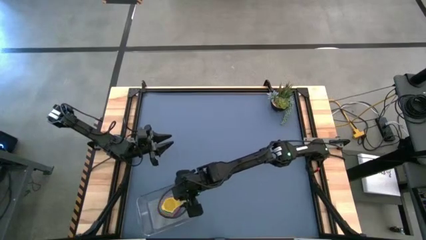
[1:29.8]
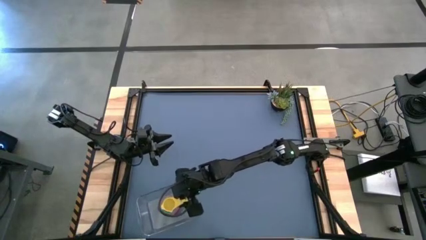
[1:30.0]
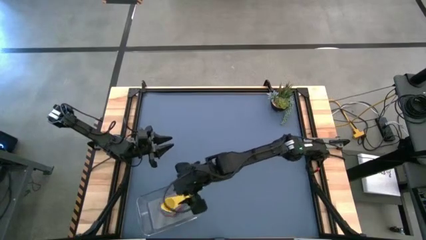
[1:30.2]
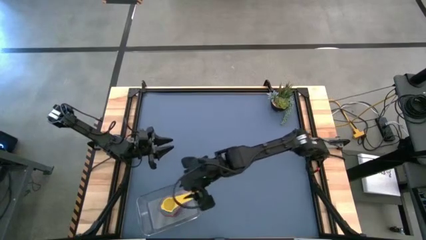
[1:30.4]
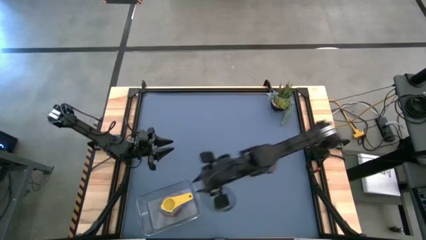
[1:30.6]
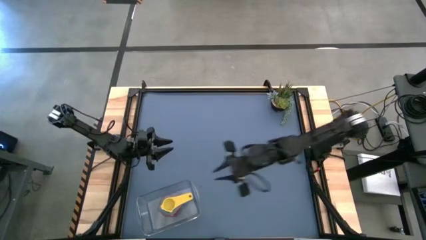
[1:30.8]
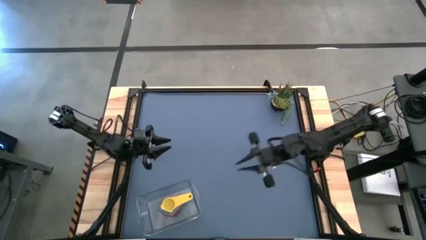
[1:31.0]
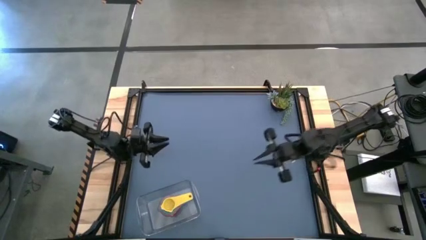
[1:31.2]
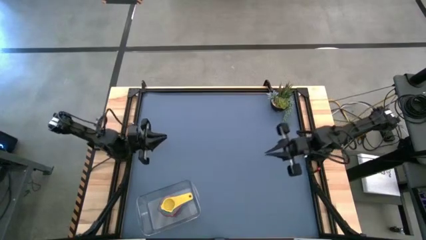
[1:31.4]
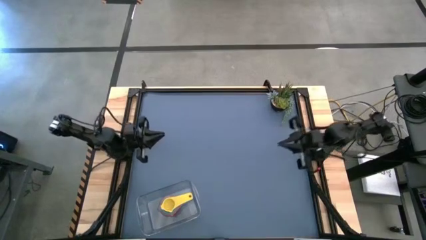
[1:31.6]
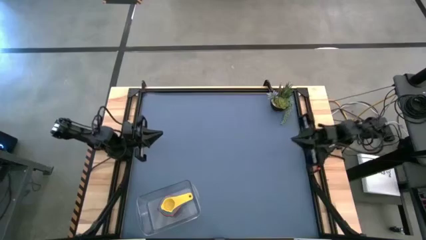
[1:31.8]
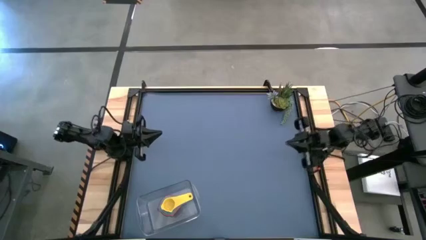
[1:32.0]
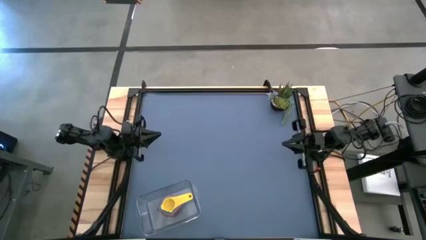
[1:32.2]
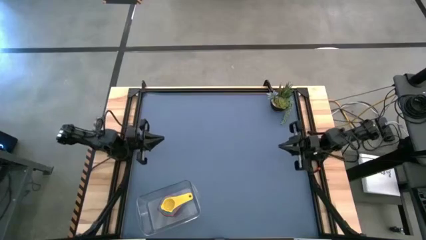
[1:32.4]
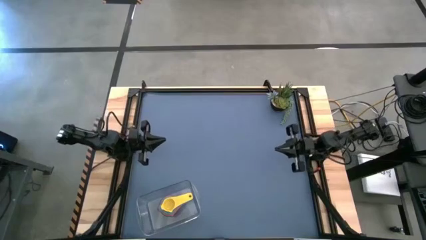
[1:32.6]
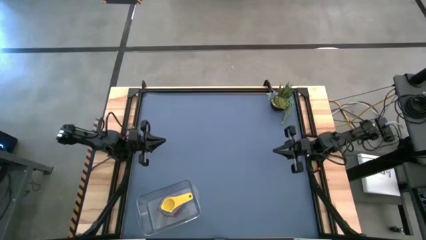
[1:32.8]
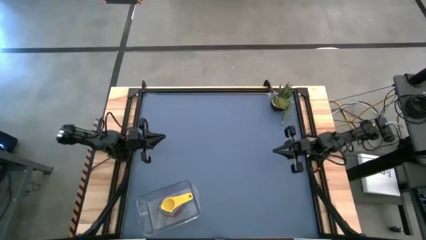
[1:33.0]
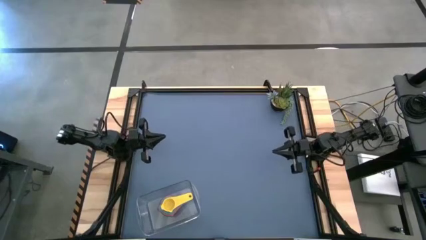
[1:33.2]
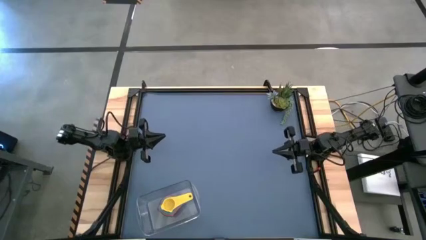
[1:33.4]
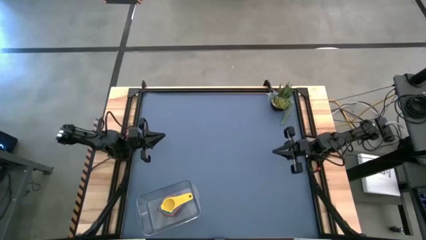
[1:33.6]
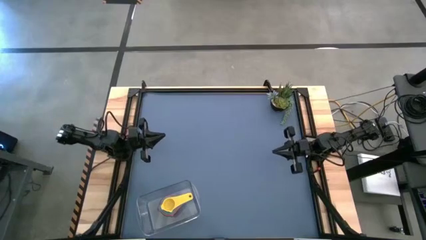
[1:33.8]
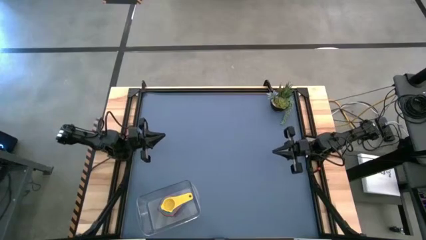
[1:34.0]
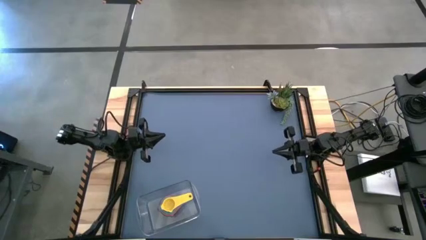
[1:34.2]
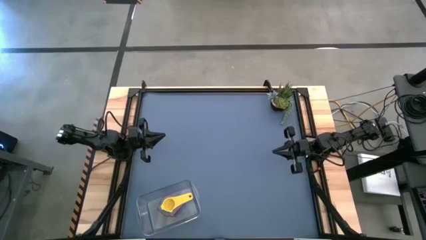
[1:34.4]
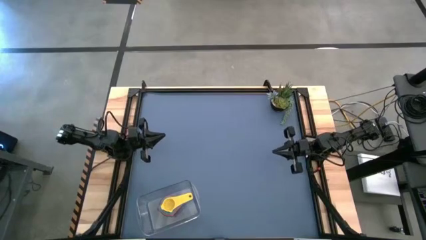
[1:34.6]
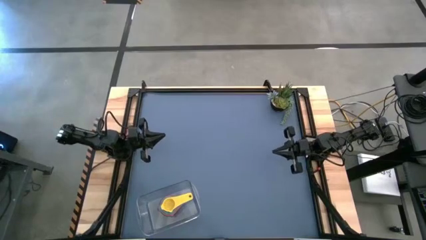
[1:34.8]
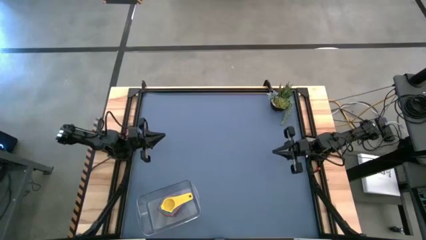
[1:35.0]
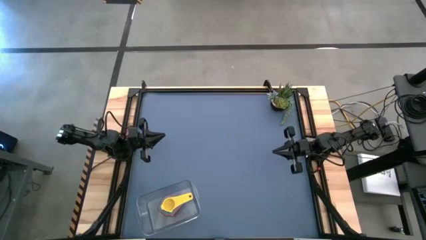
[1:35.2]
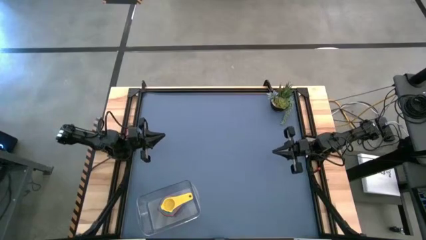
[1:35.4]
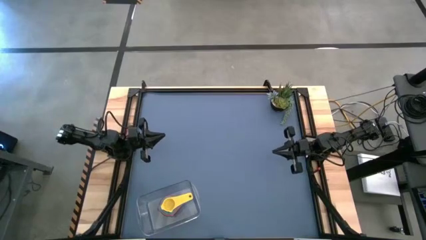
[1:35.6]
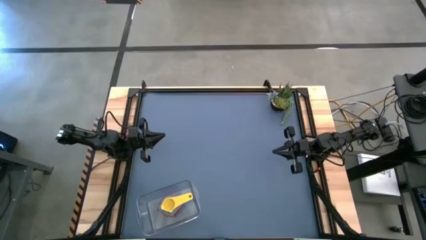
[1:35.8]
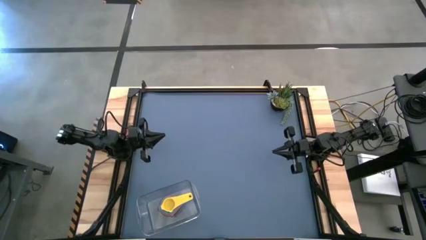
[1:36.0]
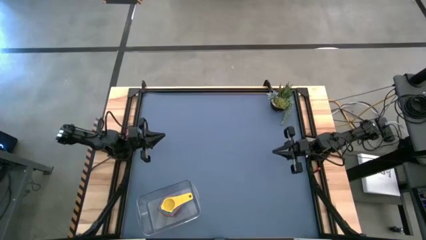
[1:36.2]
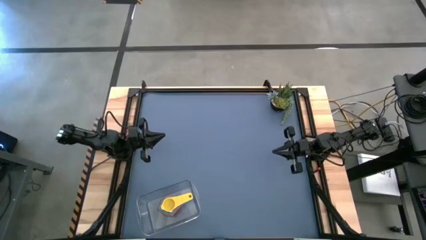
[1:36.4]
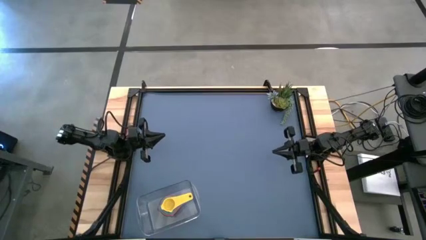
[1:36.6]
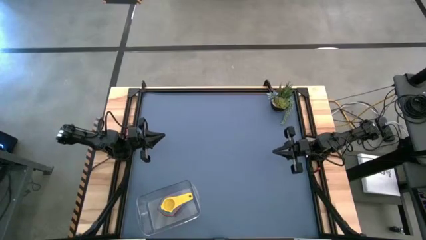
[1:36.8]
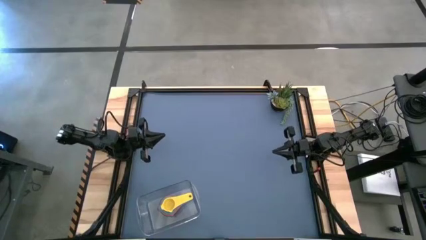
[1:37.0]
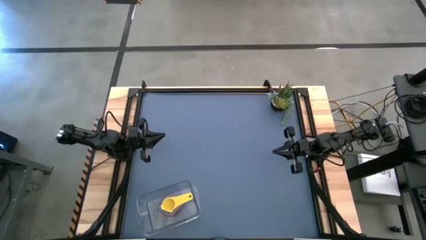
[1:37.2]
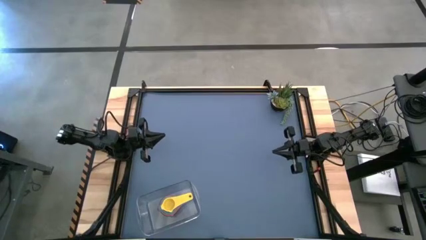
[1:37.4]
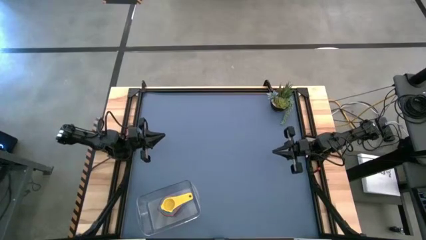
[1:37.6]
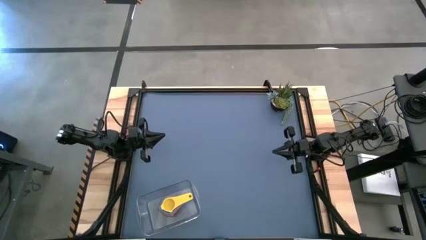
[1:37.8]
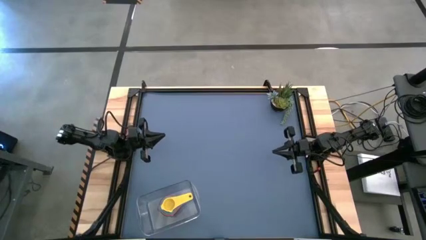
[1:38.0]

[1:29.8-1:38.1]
Task: Nest measuring cups in basket
Return to Home Position

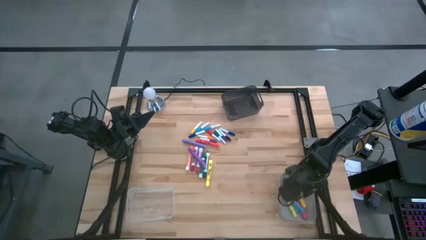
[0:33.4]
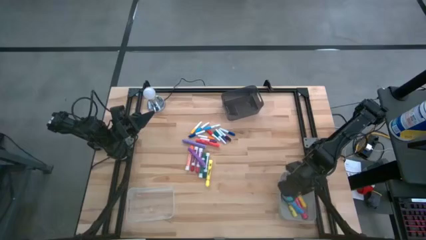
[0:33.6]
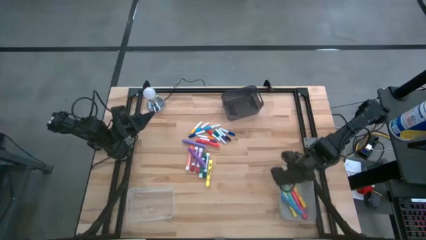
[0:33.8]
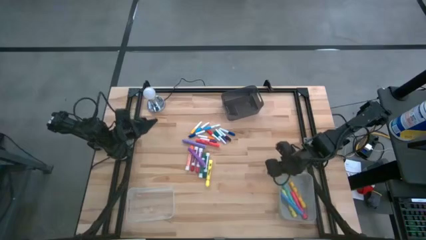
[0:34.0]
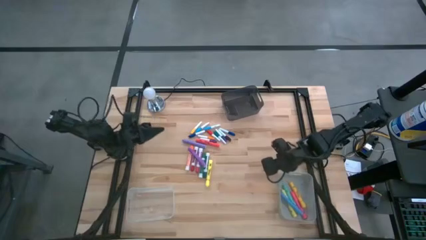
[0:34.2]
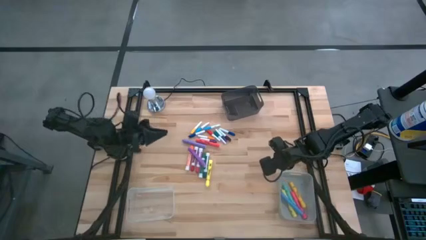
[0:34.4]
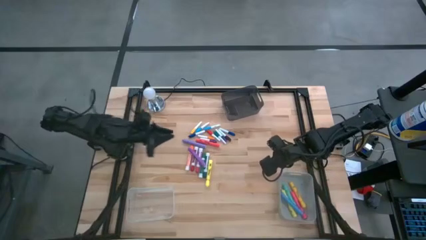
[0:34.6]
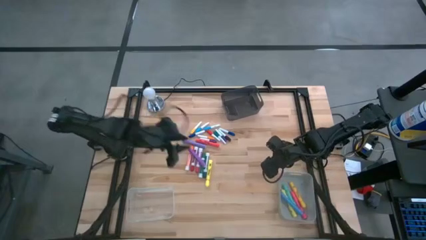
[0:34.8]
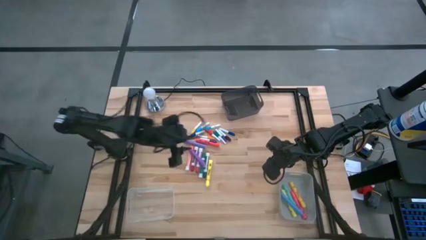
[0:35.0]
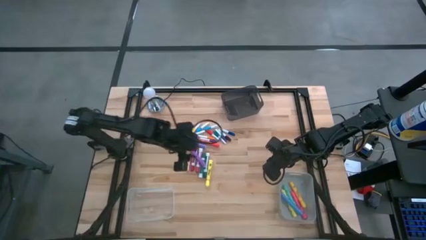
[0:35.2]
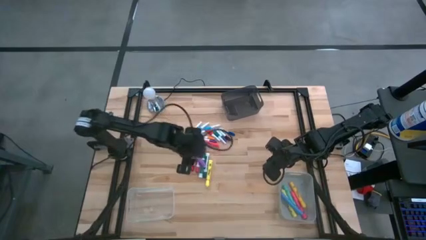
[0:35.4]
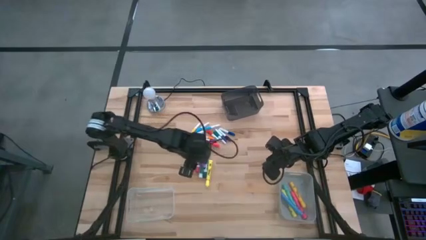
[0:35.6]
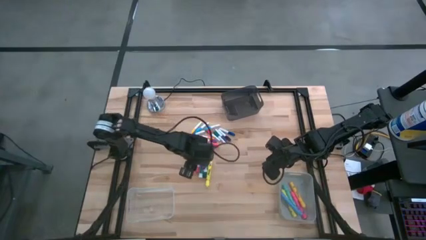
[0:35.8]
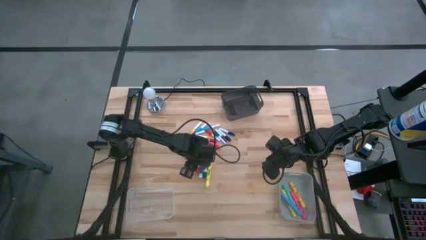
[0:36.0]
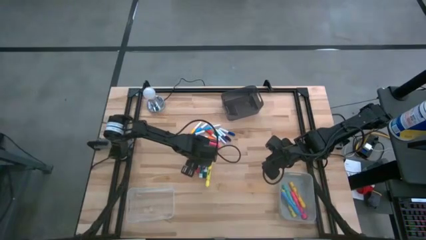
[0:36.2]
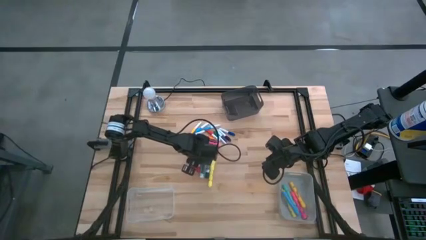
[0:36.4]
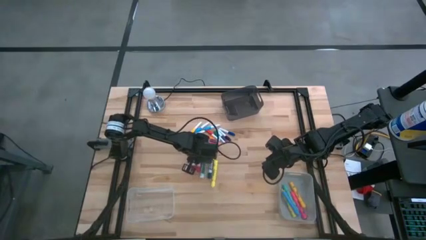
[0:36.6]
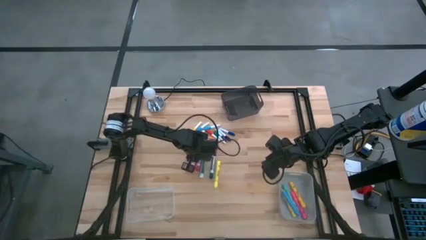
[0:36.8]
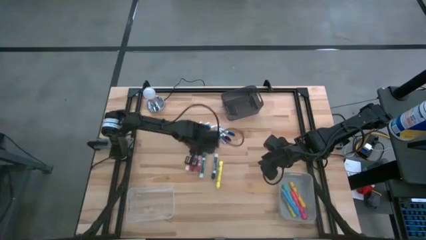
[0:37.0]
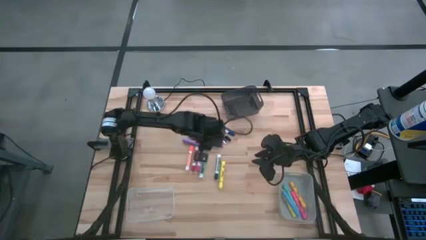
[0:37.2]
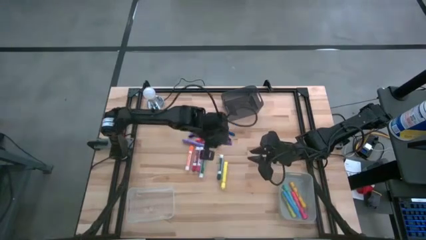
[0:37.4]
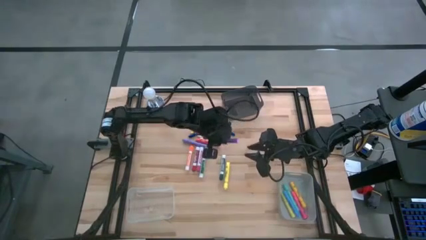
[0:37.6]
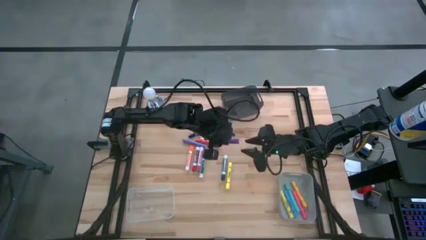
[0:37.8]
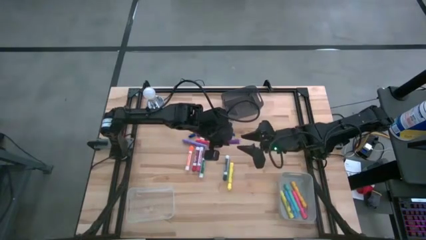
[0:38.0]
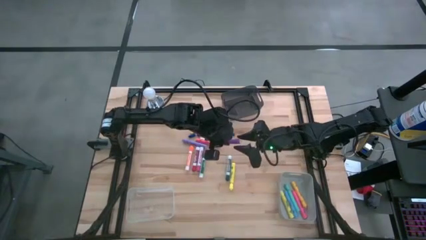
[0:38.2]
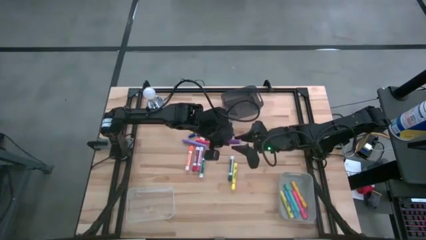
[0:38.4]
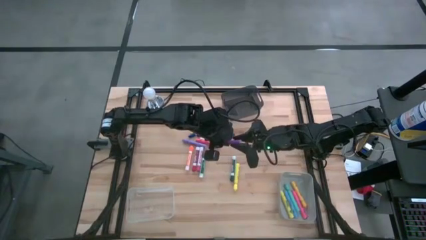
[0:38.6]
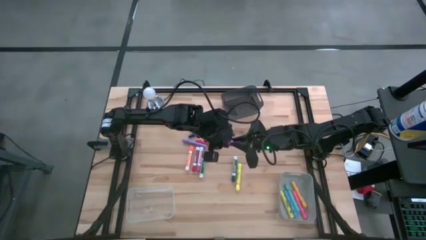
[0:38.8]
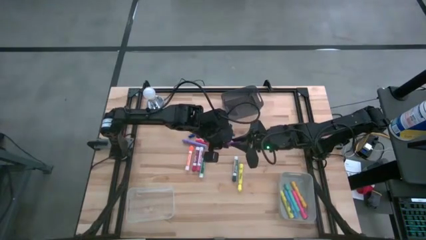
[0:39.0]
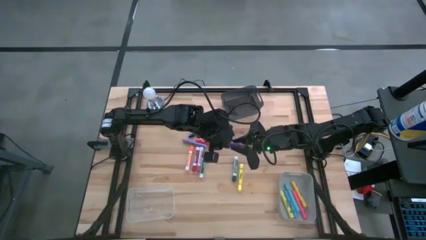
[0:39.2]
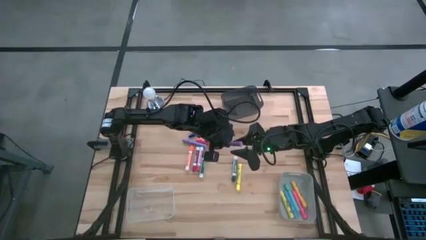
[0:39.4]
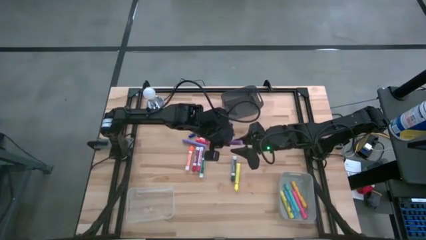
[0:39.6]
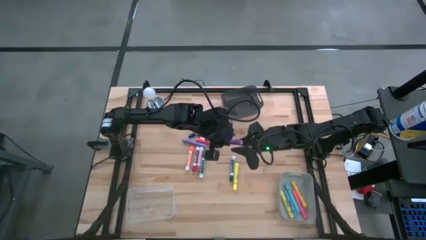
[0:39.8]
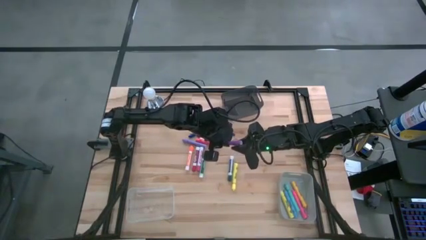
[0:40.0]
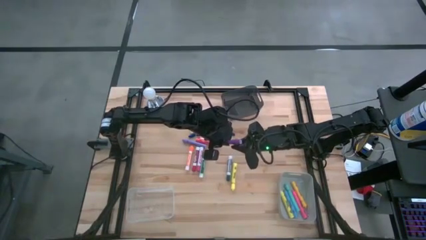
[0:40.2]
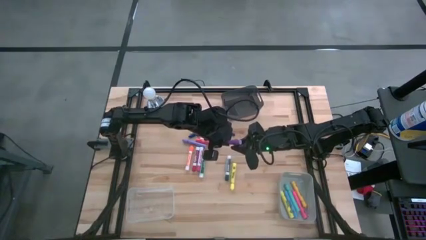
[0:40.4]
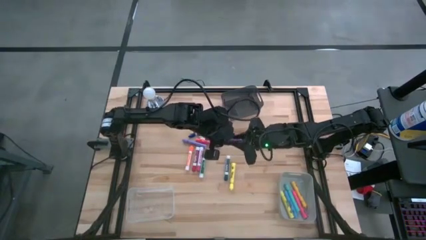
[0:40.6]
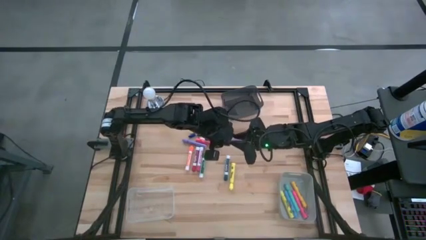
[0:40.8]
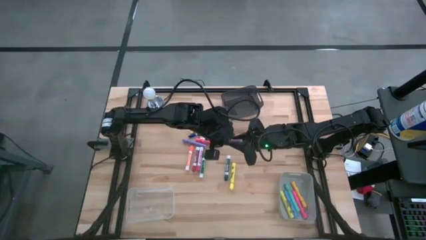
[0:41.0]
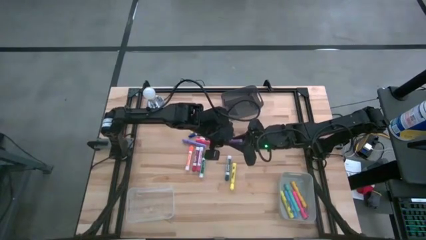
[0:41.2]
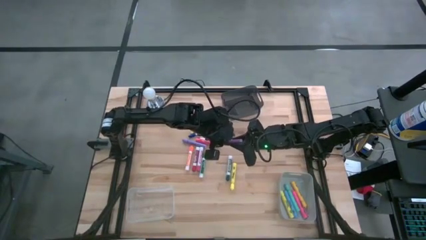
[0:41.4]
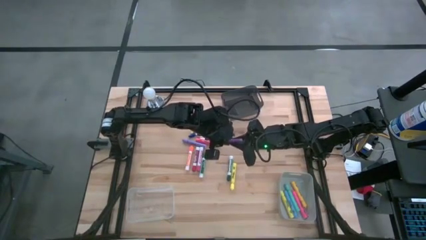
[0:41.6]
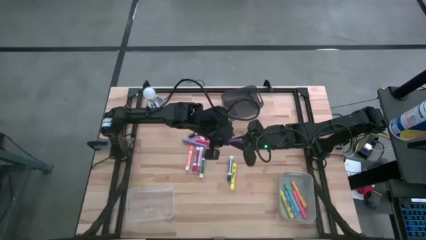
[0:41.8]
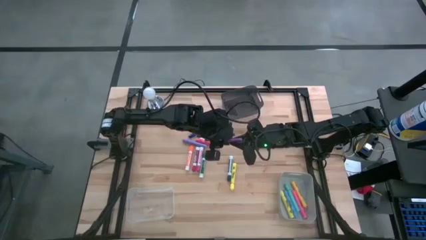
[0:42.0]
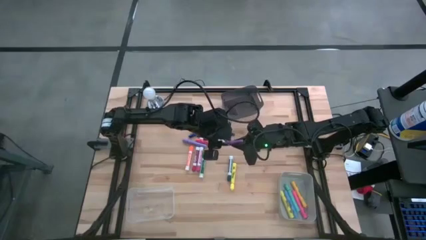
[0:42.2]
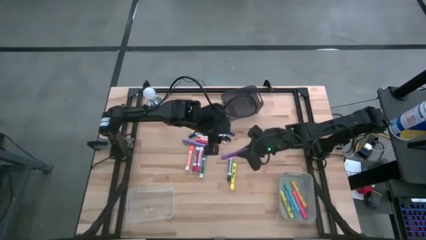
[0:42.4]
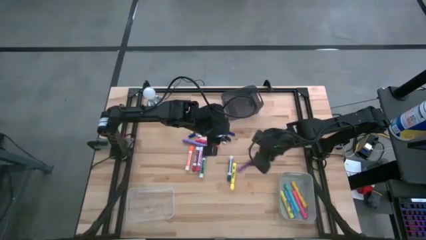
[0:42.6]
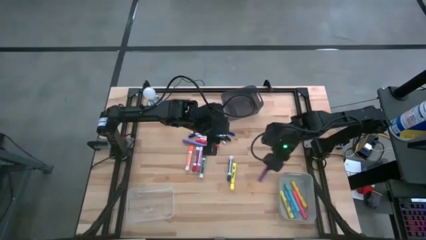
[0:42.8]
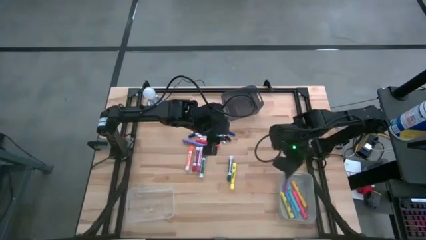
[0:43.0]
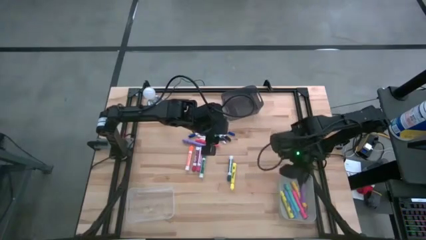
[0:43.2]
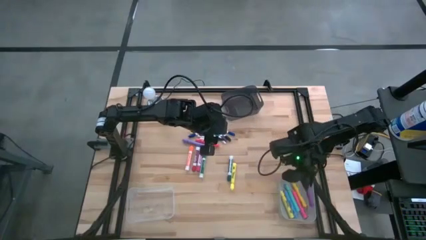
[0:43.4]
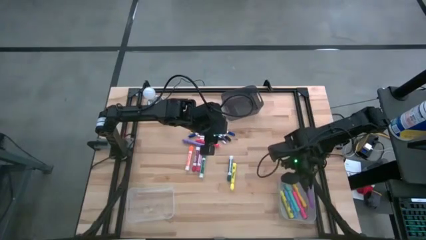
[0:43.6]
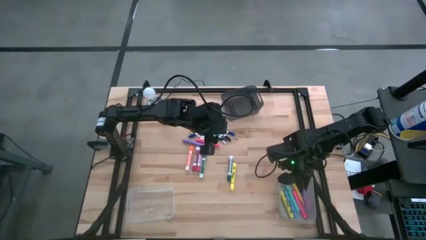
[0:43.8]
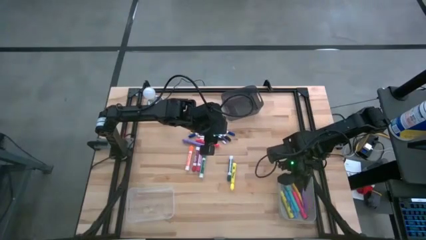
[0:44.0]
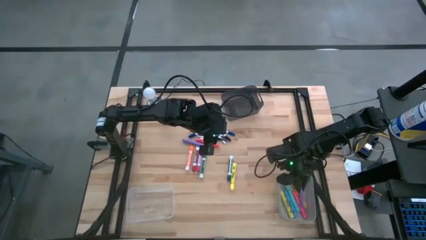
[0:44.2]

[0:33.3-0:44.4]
Task: Pick & Place Markers
Put the bottom purple highlighter pen into the gray bin
